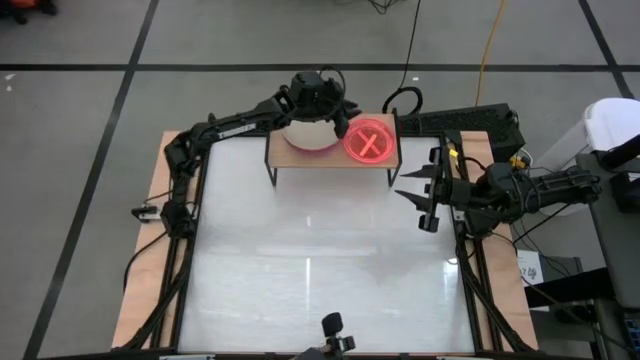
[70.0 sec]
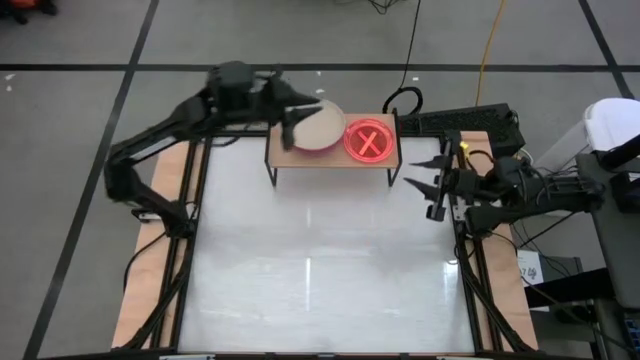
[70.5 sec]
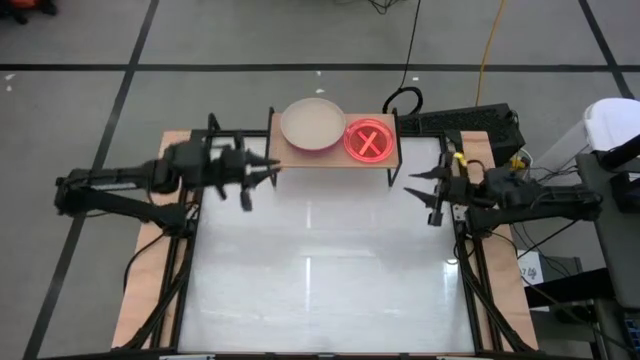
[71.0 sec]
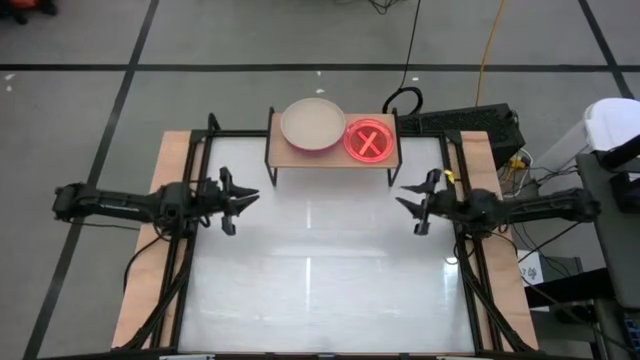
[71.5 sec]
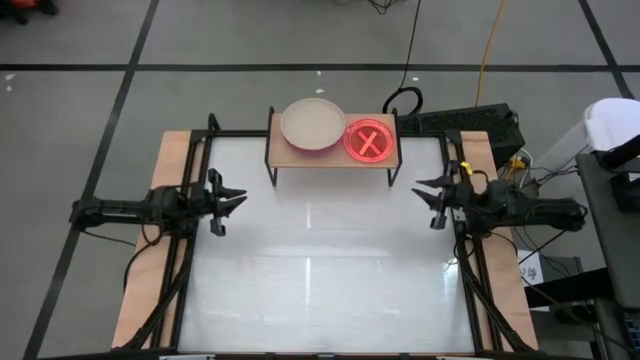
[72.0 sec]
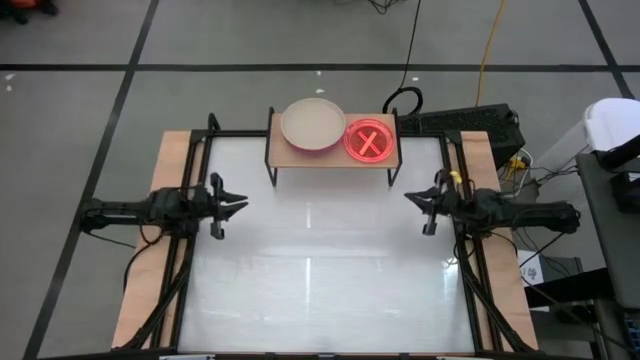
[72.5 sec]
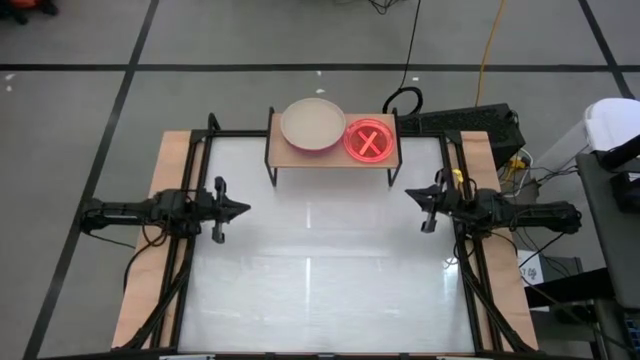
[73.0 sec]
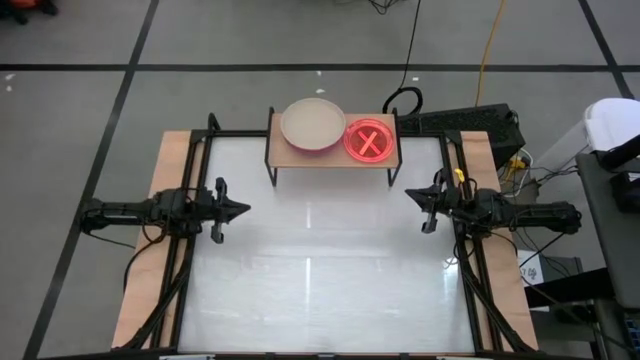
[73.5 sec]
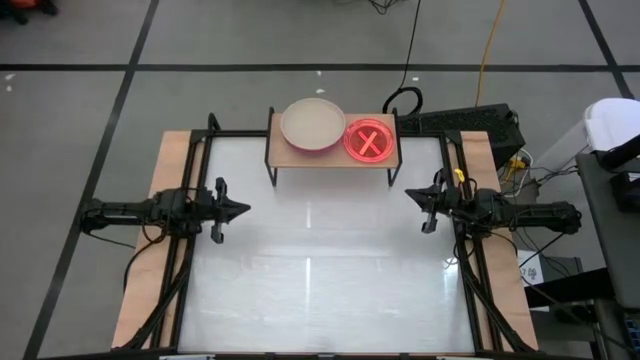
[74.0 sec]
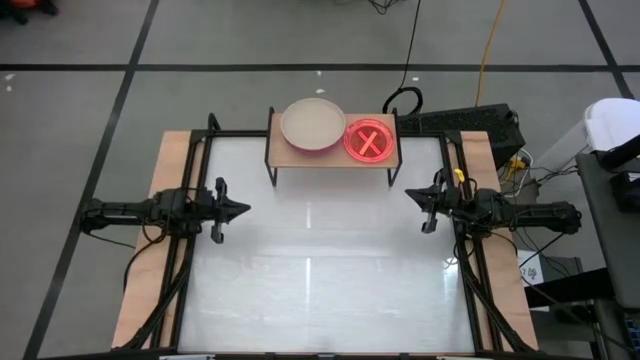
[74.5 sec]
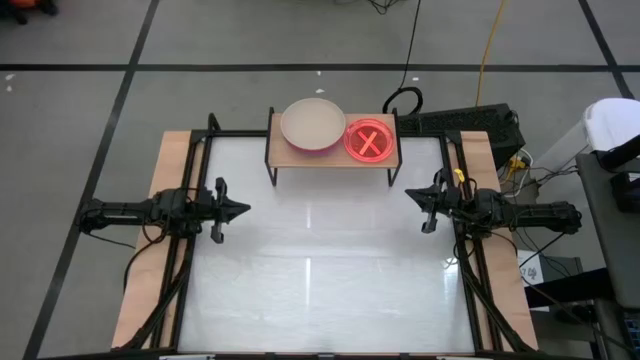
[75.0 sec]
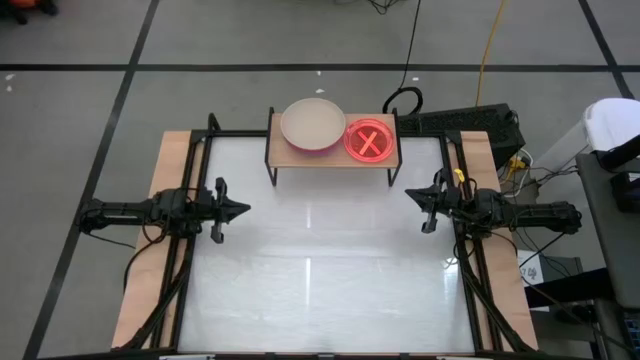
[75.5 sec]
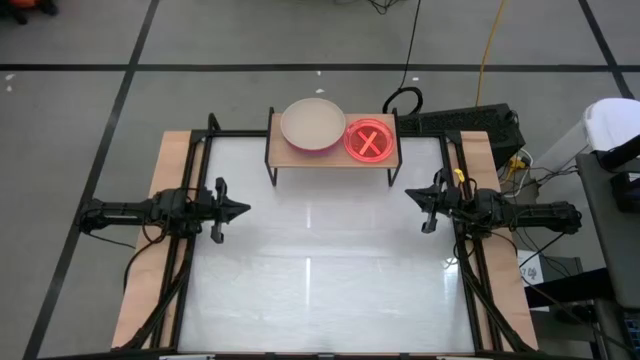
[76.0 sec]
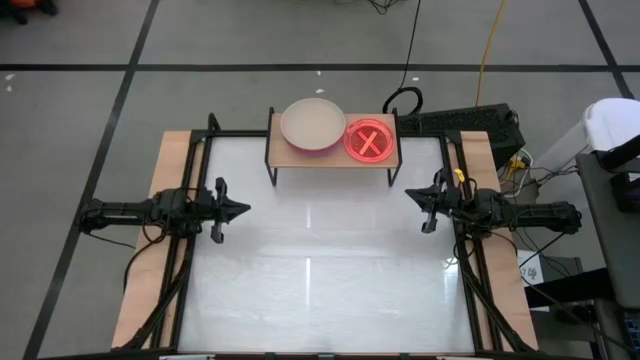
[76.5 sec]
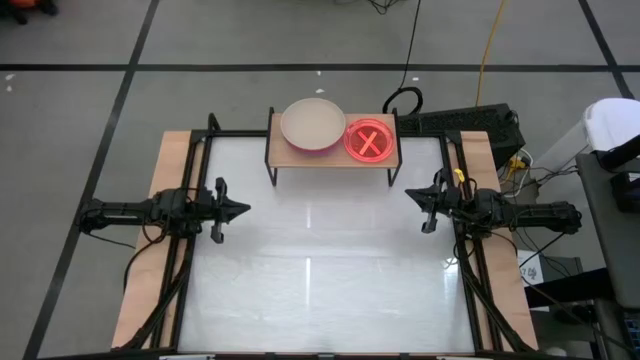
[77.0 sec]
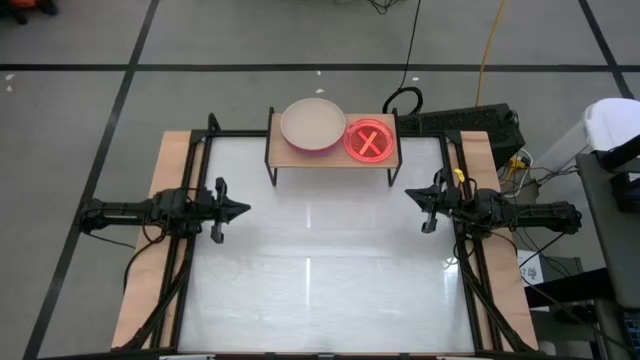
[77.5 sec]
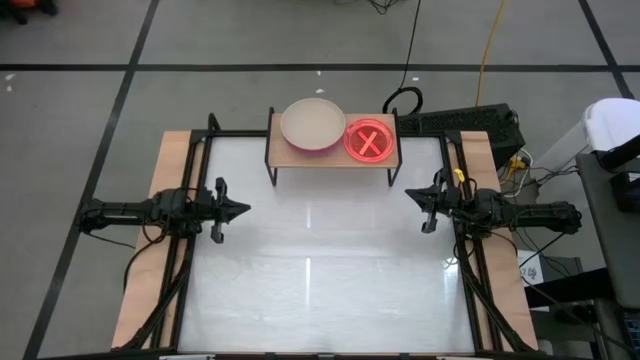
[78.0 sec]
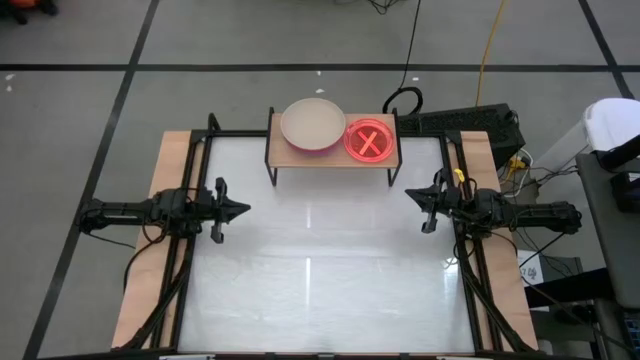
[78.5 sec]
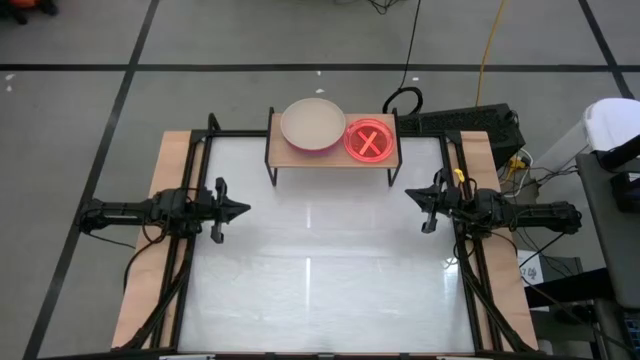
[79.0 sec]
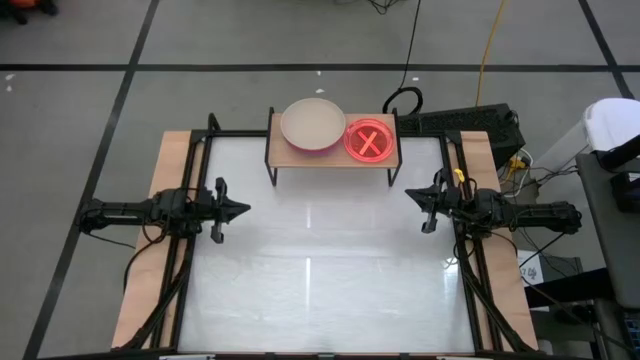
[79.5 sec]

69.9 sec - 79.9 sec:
Task: Place and stack plates onto a shelf
Return to Home Position

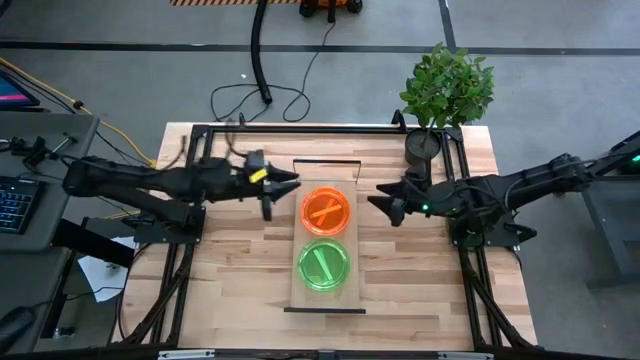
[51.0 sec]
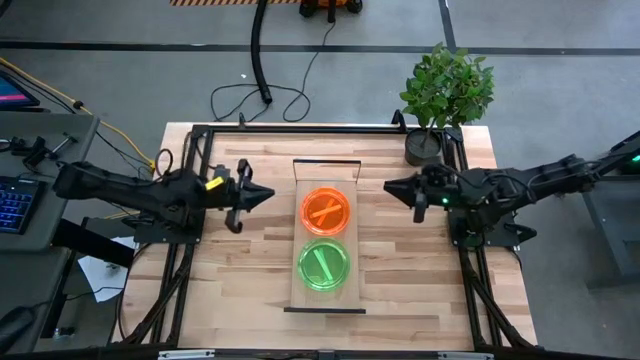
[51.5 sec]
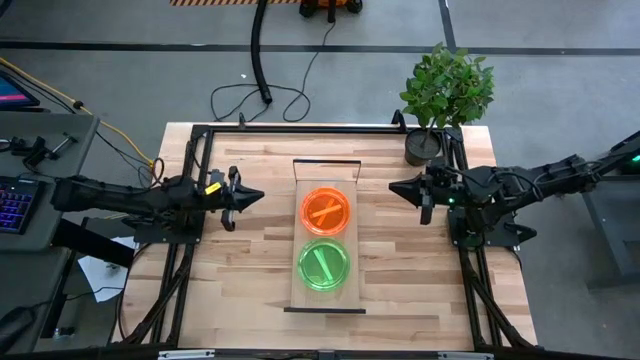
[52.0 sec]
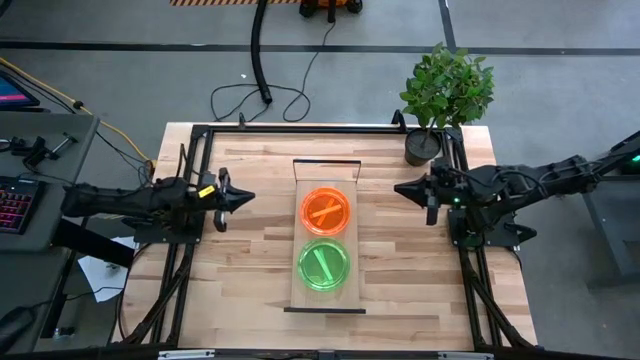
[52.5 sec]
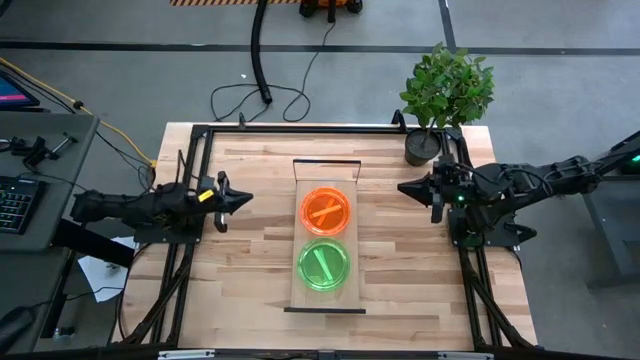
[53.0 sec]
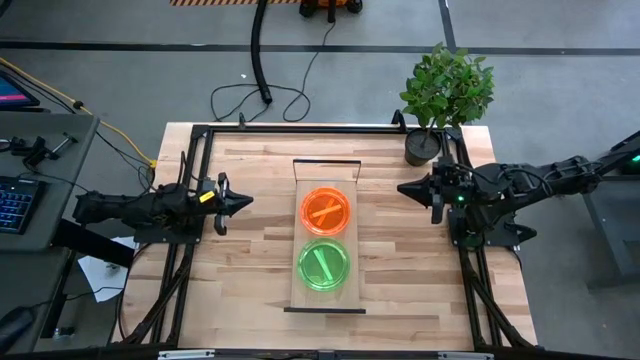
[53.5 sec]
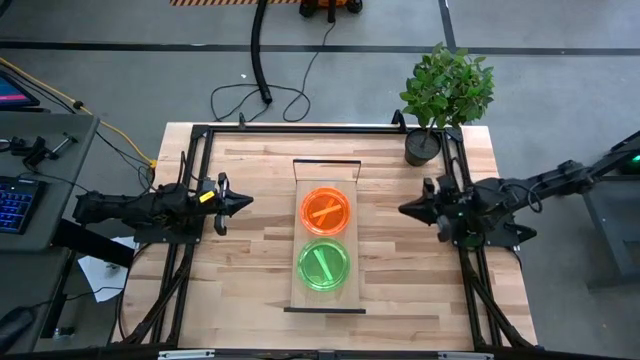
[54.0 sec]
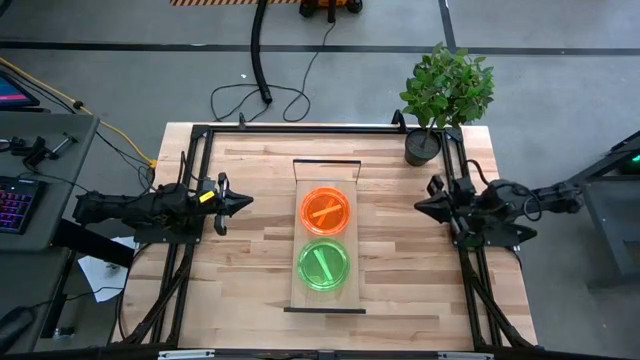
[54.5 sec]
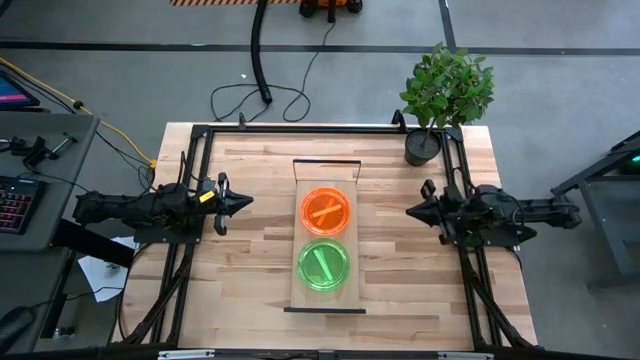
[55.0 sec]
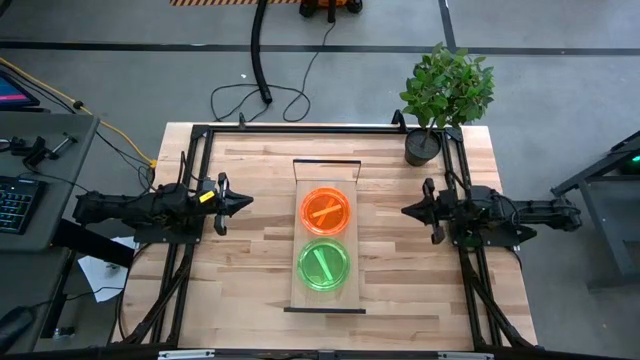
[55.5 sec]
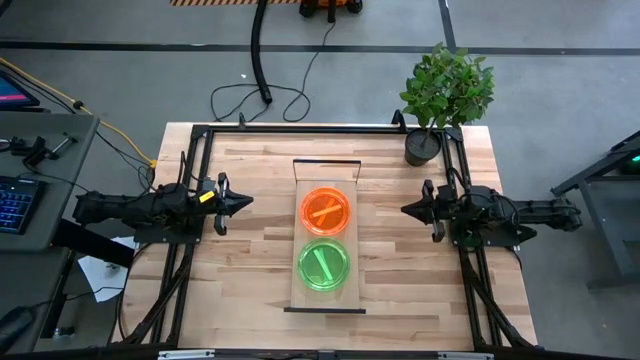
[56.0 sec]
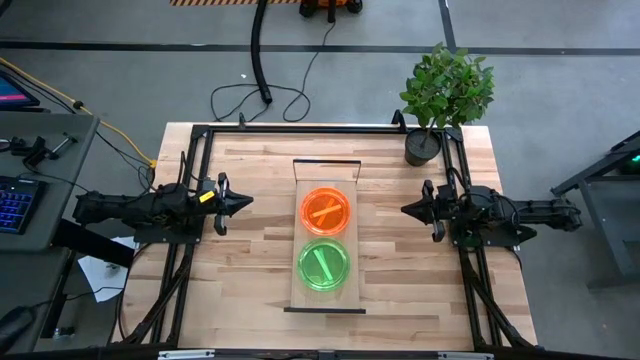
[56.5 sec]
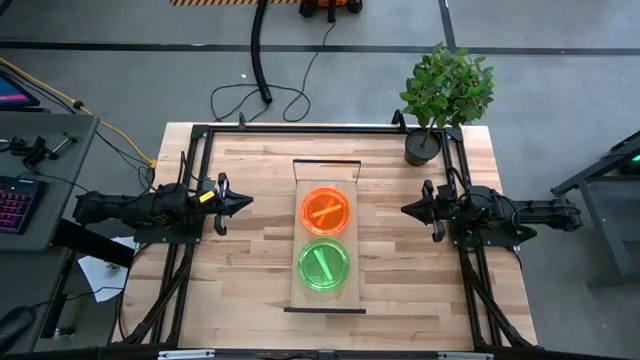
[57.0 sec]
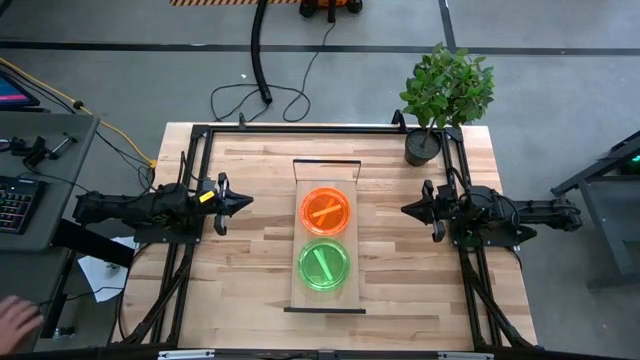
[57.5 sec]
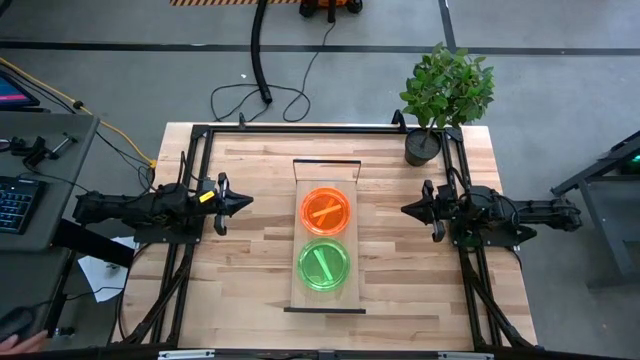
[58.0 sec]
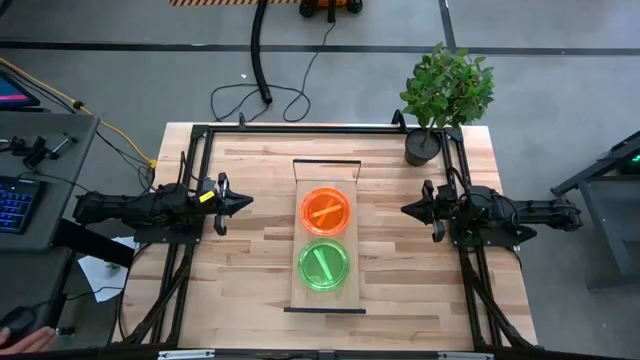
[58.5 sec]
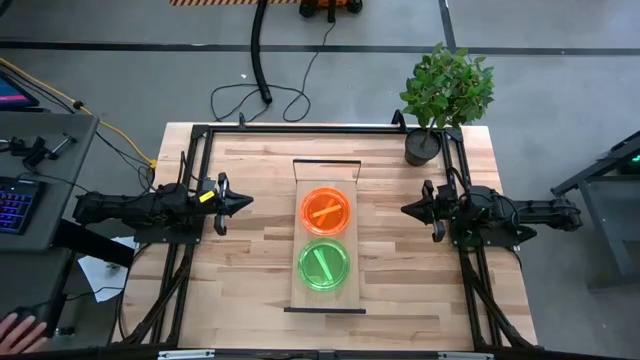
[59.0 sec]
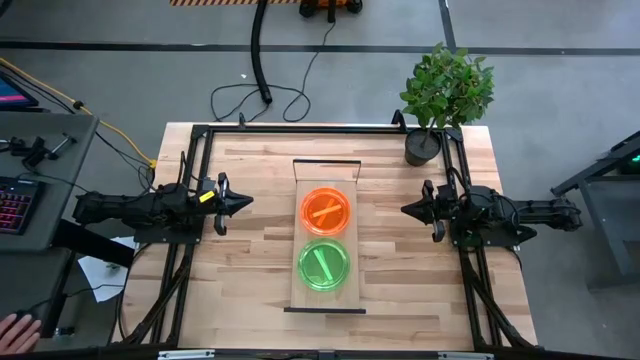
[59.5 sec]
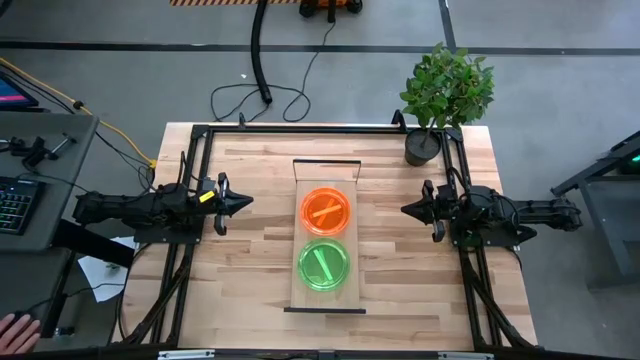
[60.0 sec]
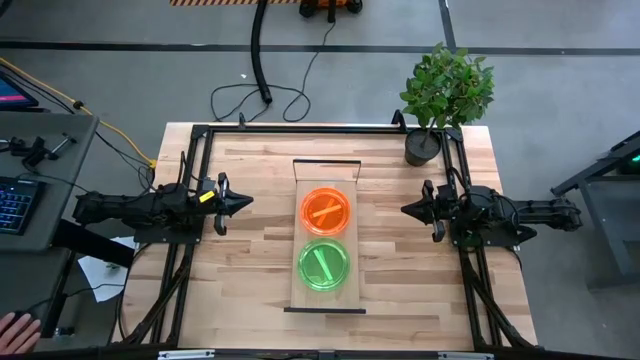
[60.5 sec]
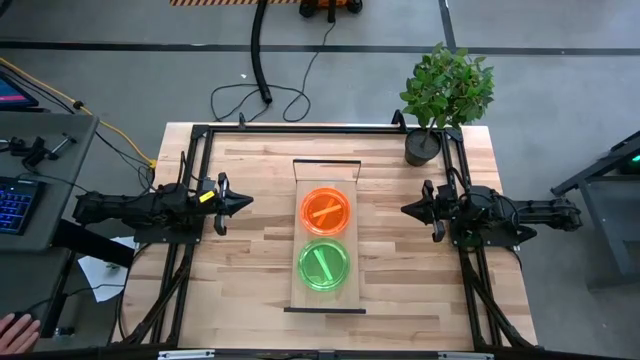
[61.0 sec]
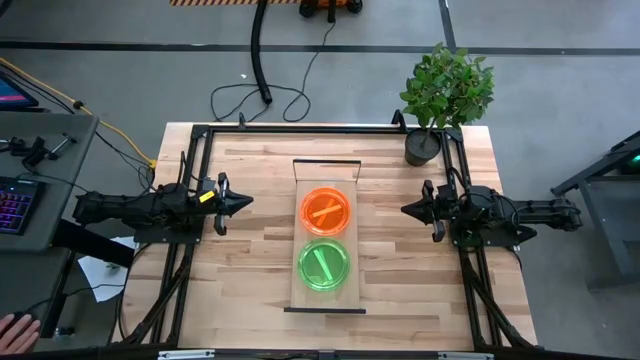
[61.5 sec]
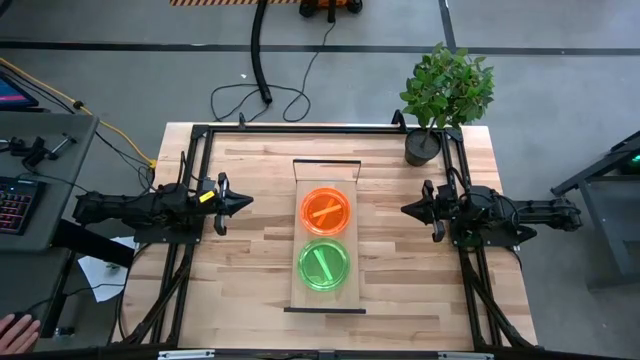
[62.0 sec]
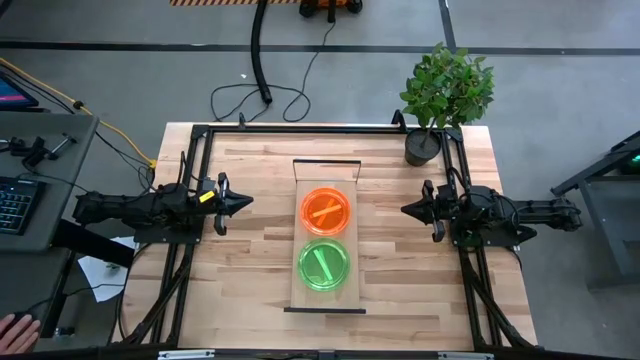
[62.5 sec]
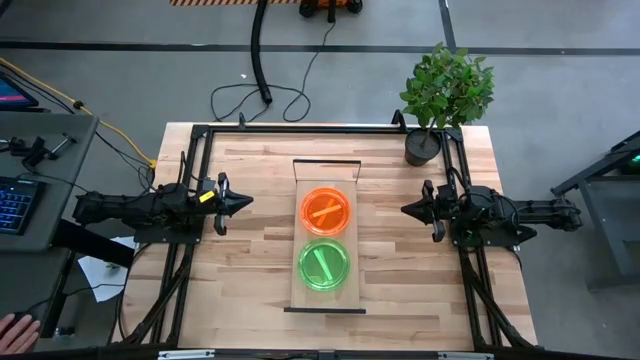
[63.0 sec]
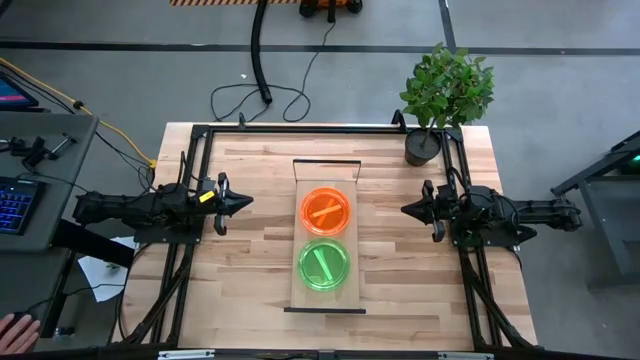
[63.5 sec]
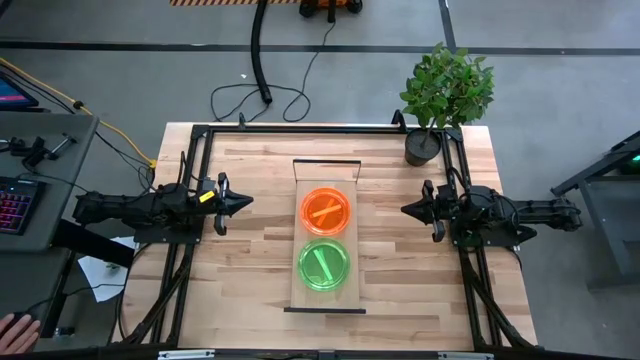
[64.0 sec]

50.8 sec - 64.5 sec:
Task: Place and stack plates onto a shelf
Return to Home Position
